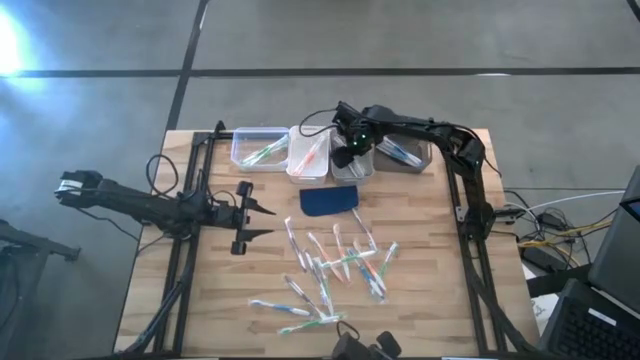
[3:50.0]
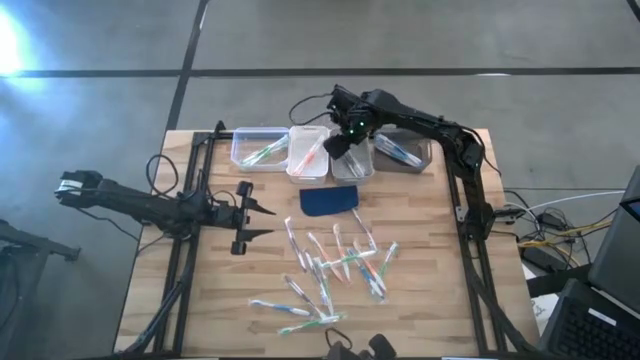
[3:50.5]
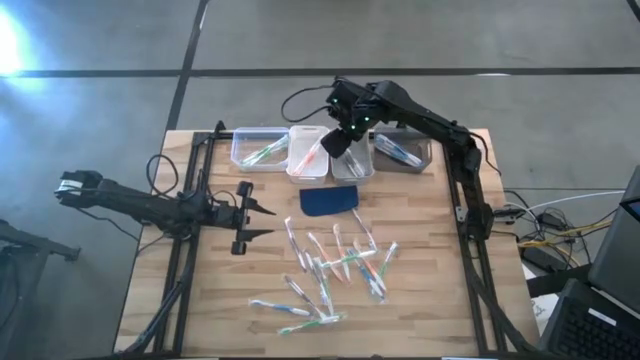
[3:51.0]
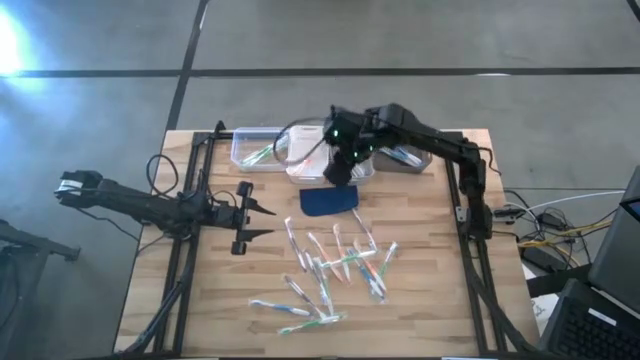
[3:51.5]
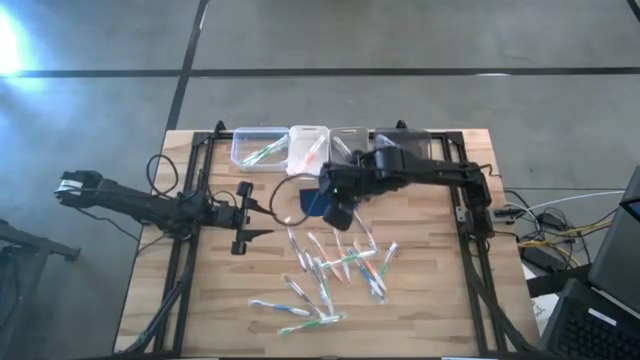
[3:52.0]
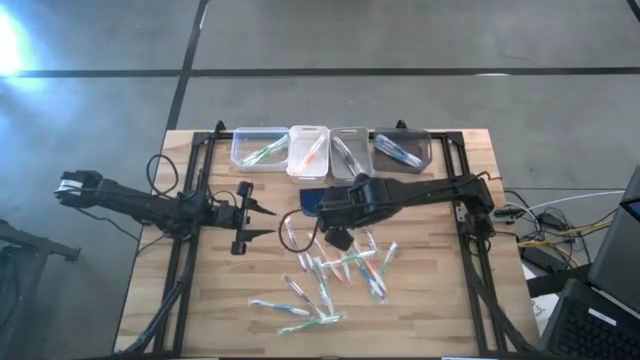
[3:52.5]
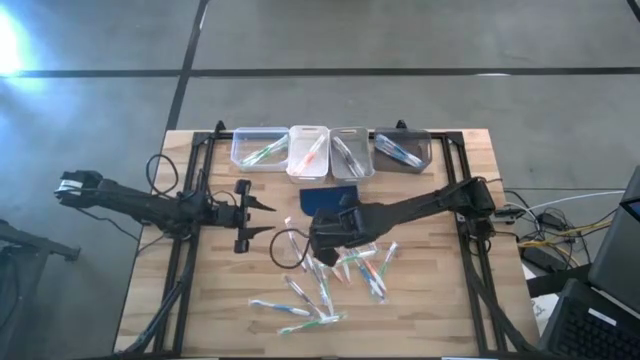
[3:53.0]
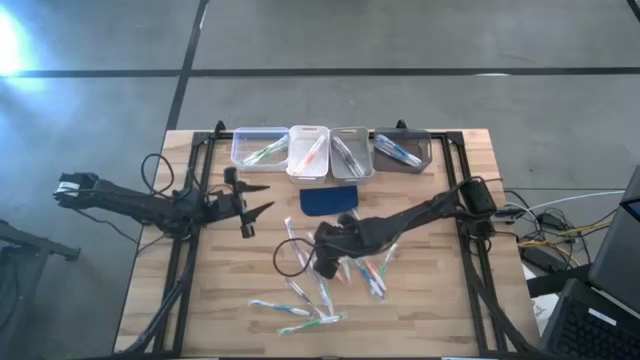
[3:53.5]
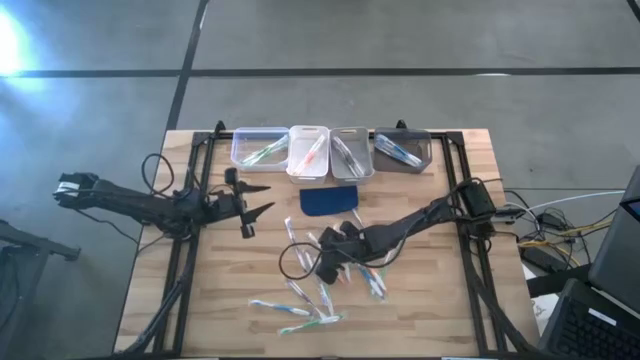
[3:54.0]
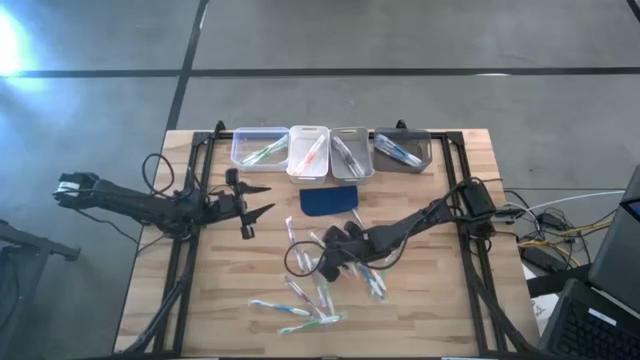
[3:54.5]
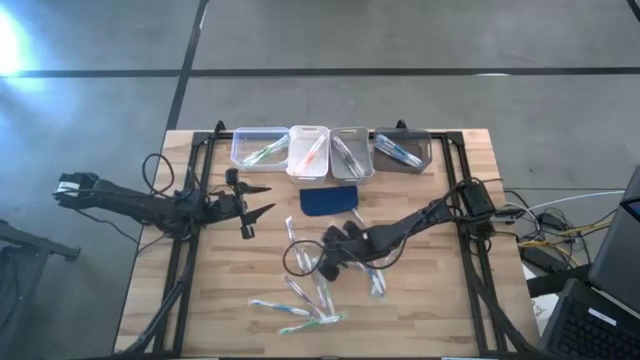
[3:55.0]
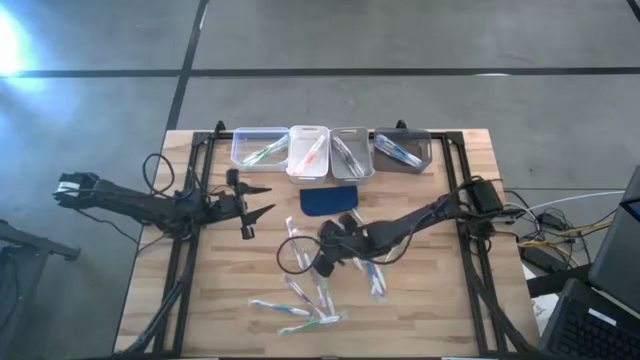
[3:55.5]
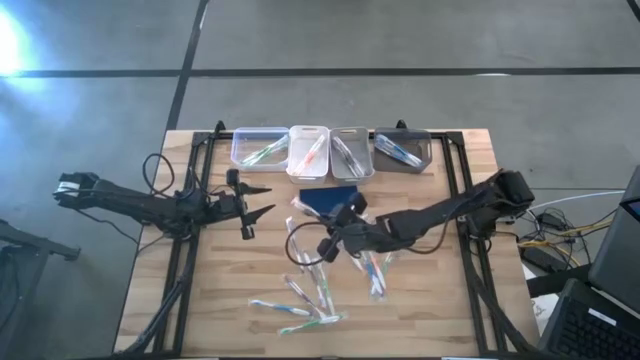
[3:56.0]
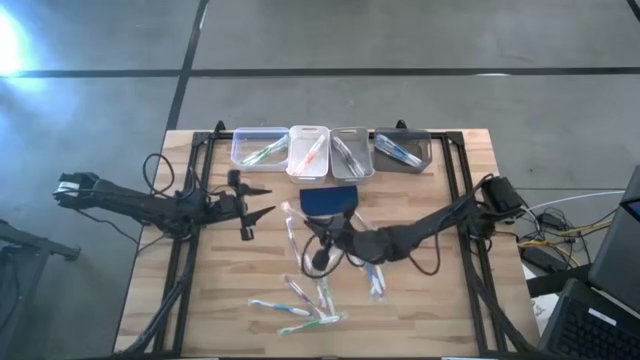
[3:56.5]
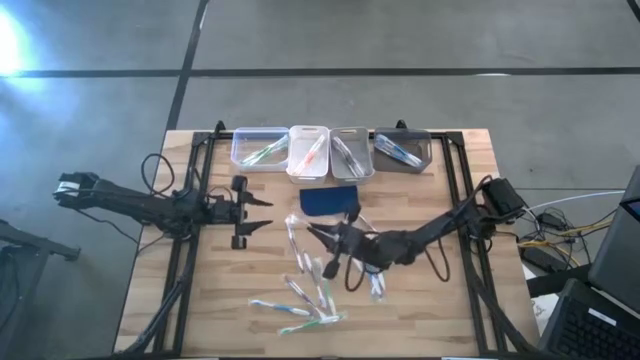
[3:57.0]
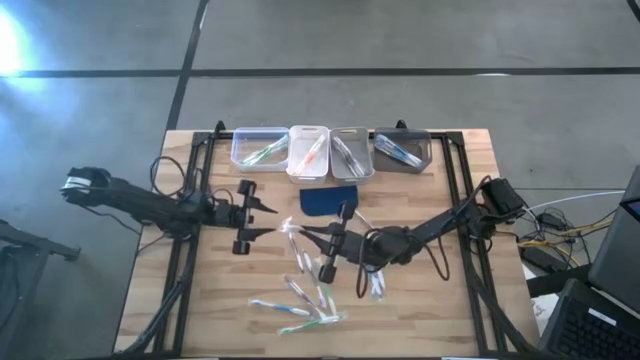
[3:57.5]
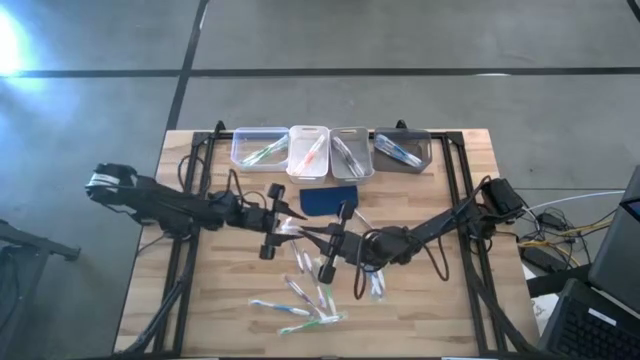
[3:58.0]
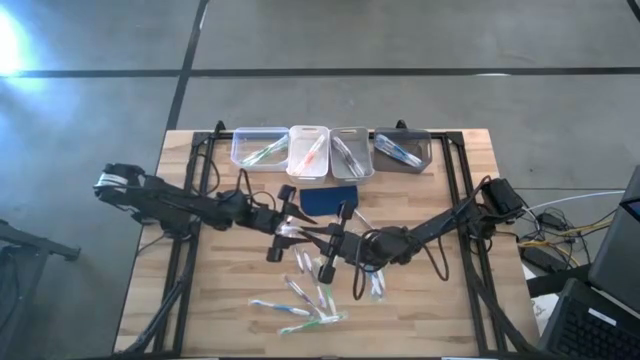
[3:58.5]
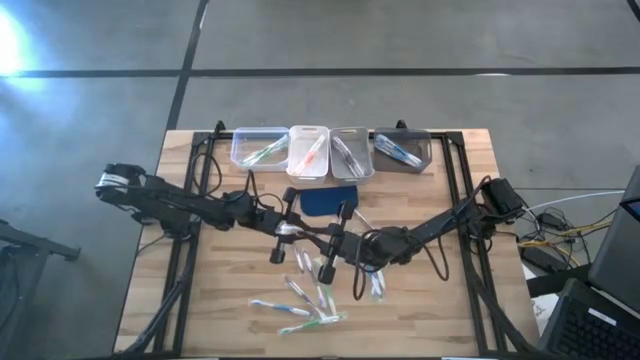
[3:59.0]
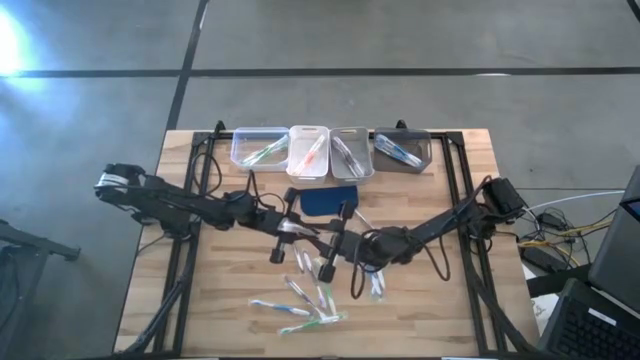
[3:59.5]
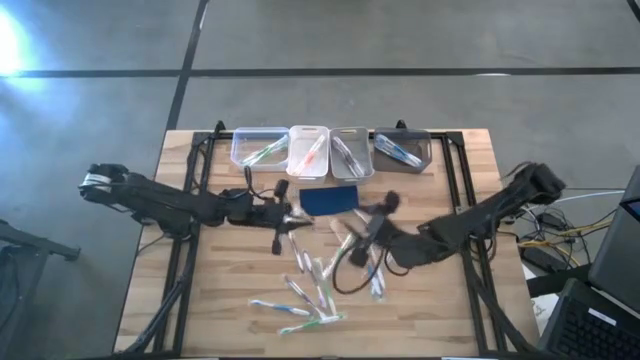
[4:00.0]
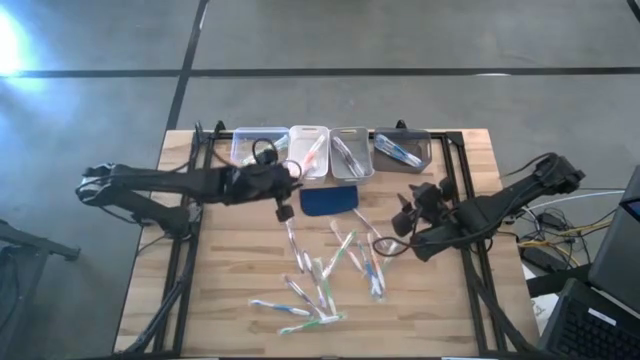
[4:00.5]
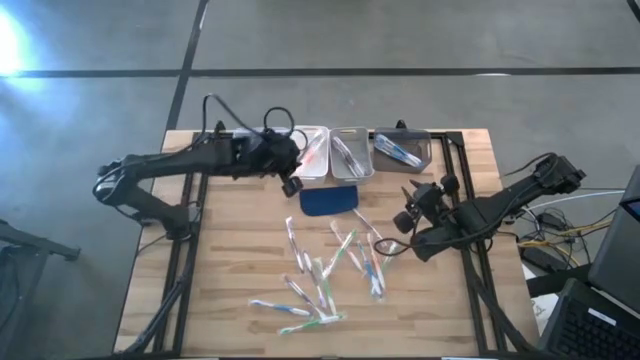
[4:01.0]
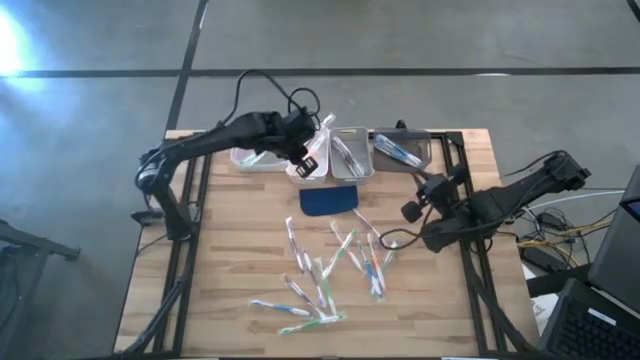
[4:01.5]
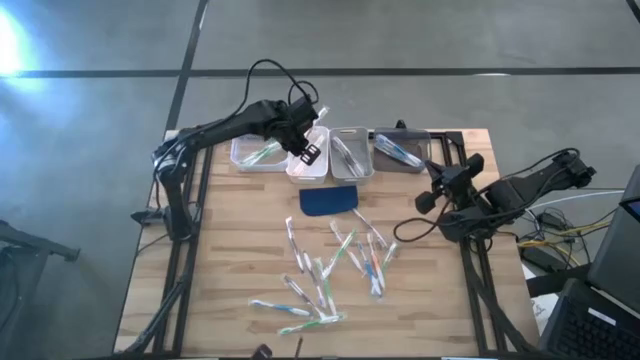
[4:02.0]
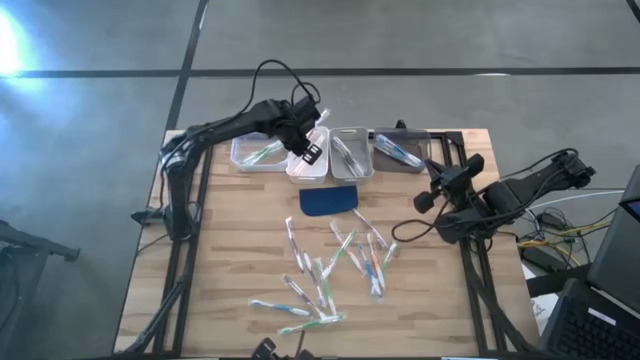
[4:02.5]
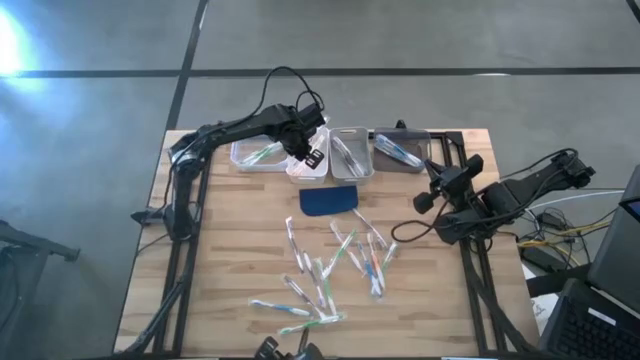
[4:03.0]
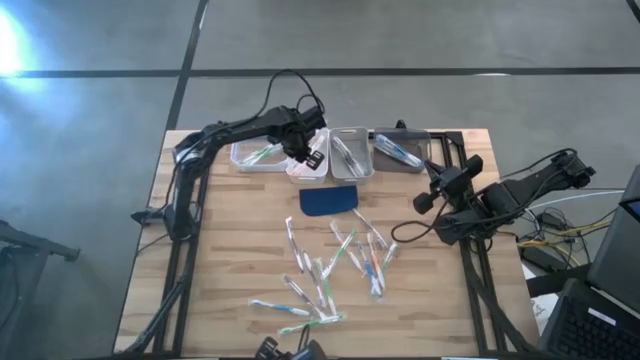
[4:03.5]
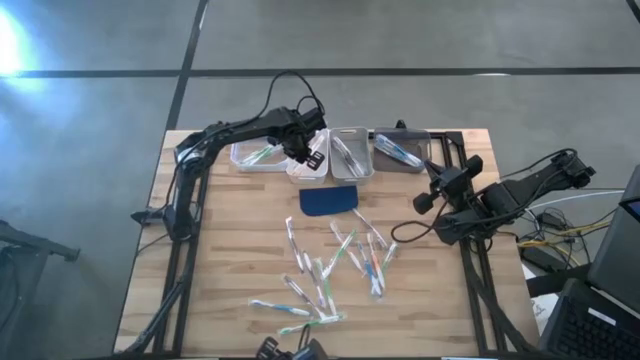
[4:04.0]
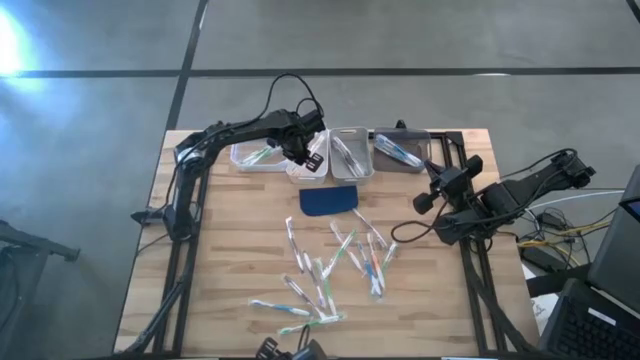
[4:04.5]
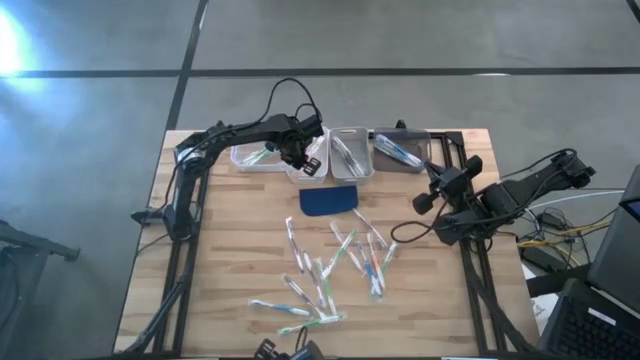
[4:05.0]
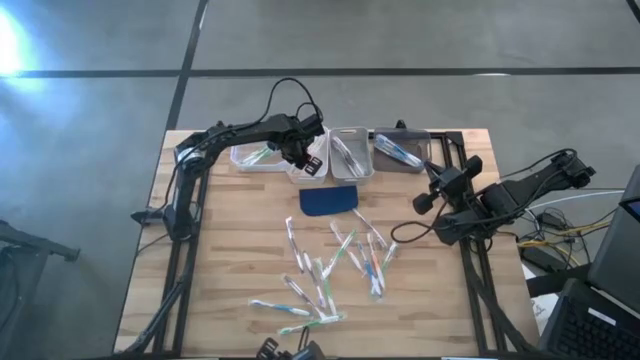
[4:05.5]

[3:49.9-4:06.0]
Task: Pick & Place Toothbrushes
Put the orange toothbrush into the white bin

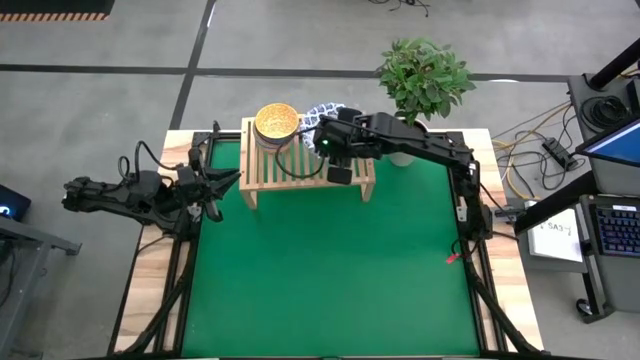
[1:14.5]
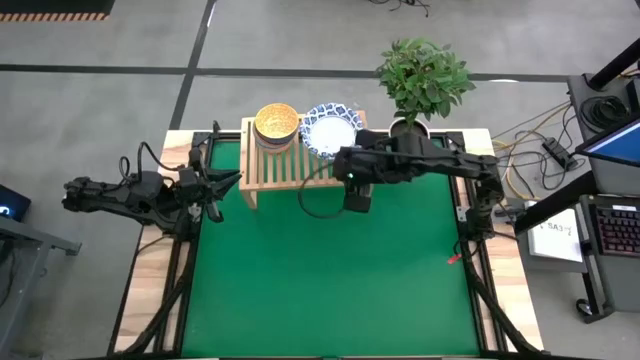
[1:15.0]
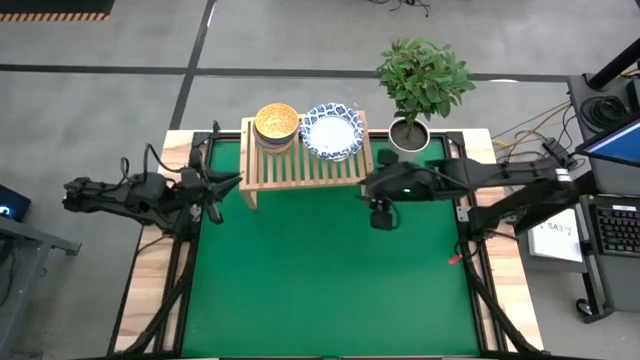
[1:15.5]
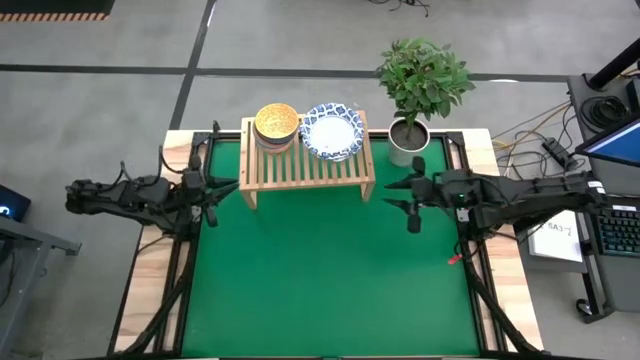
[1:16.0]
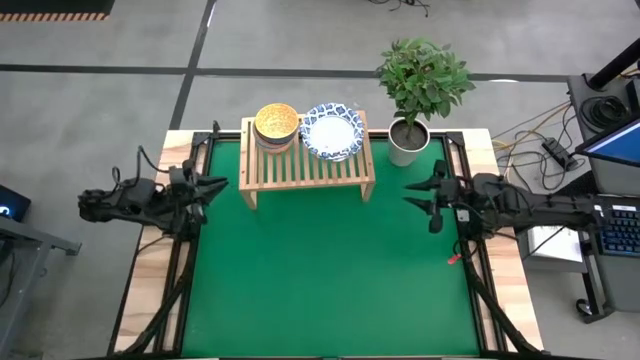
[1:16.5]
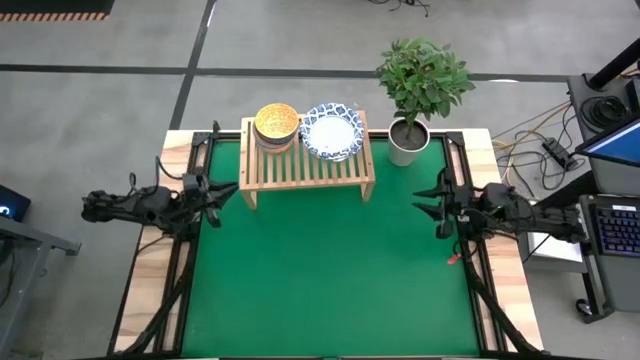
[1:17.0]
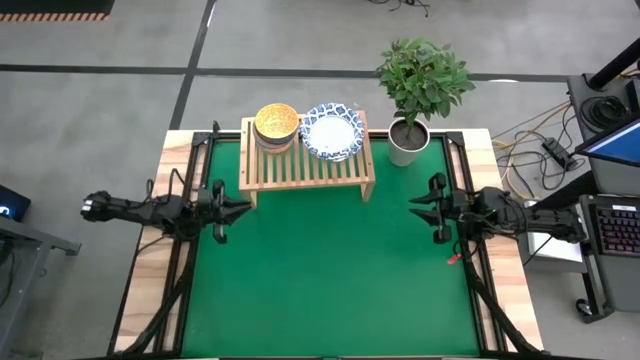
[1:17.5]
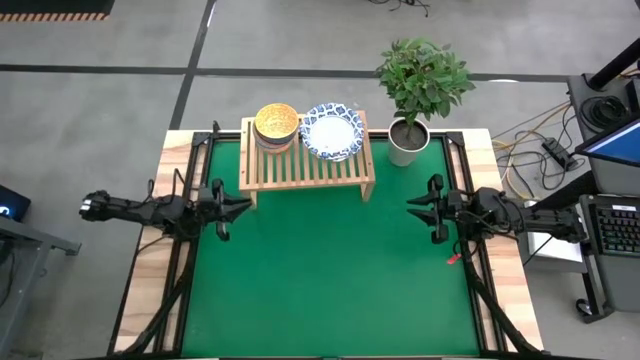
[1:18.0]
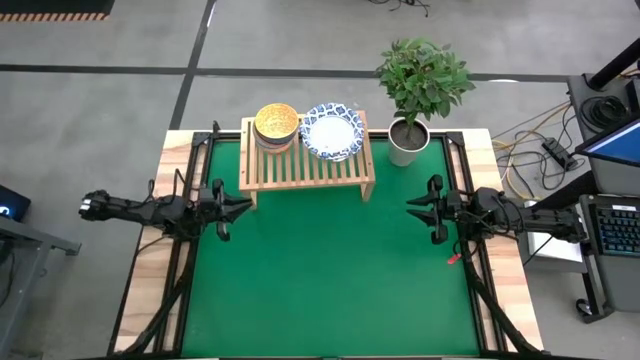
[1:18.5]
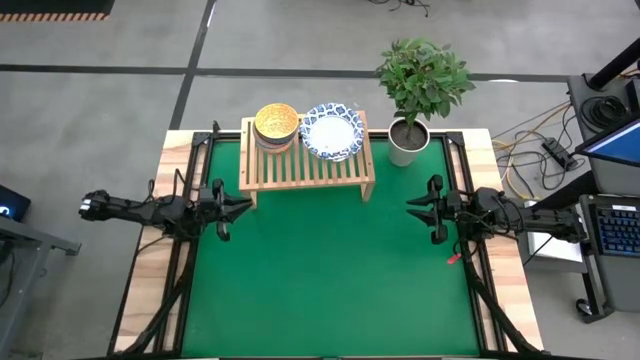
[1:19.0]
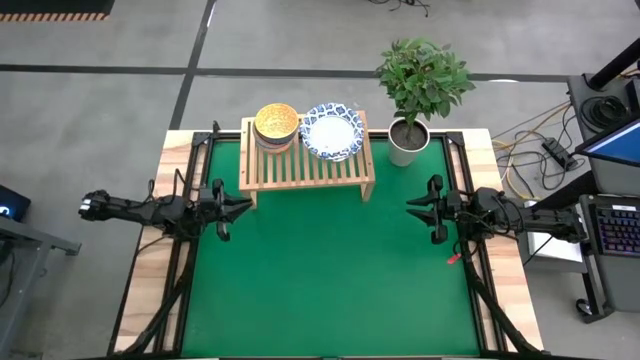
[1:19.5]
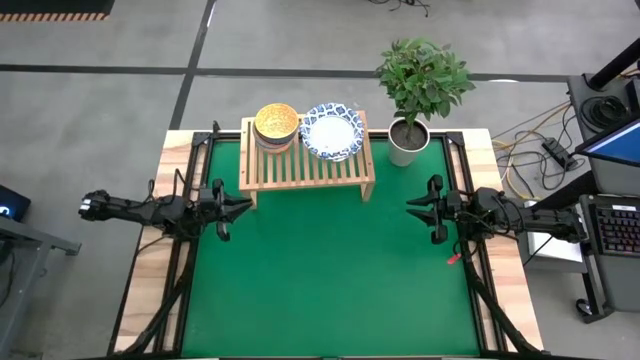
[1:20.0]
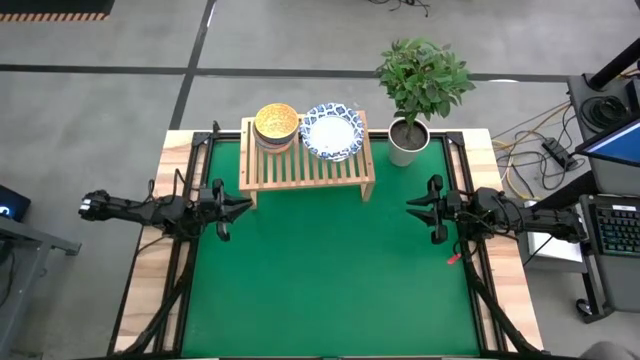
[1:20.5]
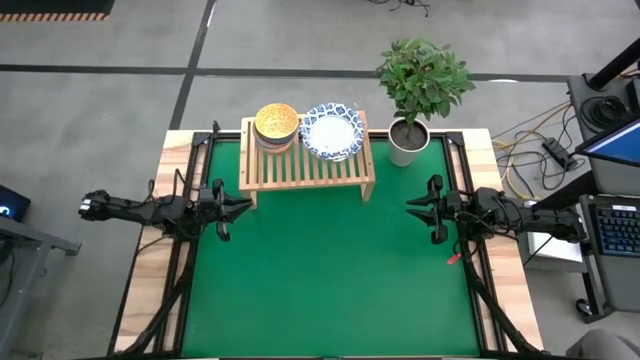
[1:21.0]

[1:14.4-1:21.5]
Task: Place and stack bowls onto a shelf
Return to Home Position
